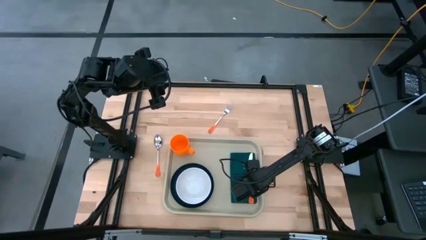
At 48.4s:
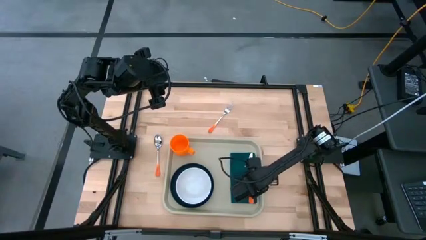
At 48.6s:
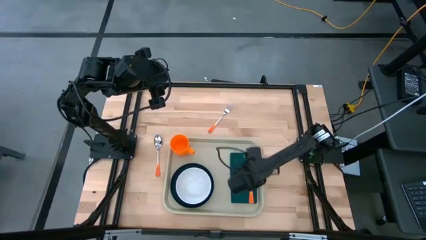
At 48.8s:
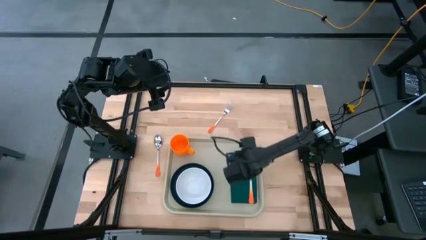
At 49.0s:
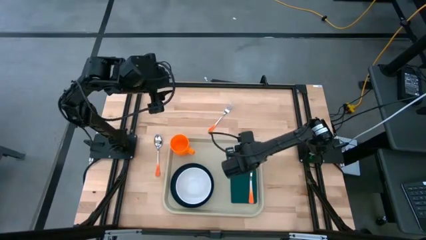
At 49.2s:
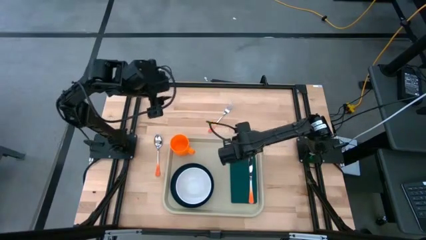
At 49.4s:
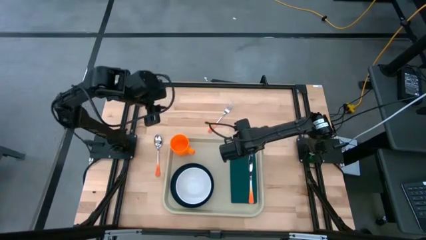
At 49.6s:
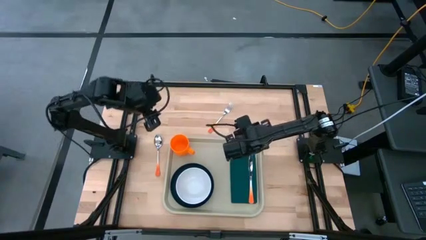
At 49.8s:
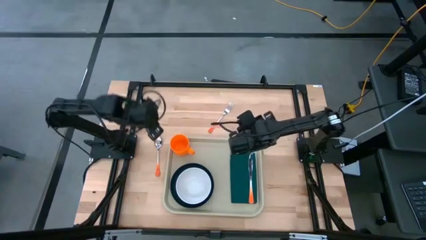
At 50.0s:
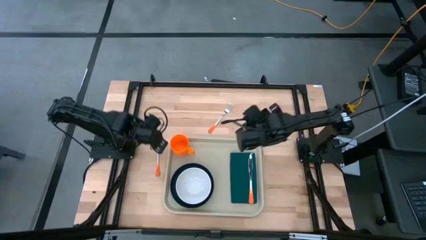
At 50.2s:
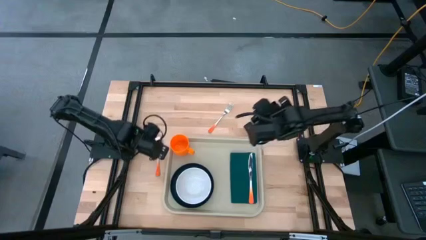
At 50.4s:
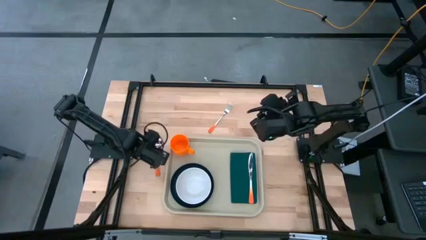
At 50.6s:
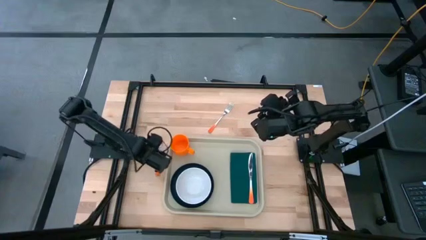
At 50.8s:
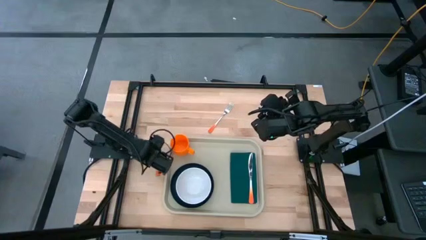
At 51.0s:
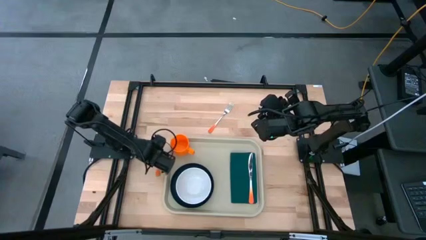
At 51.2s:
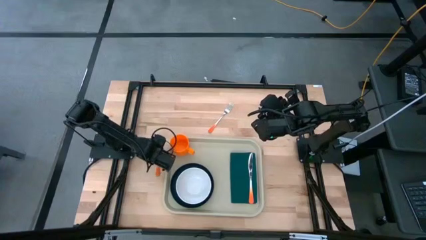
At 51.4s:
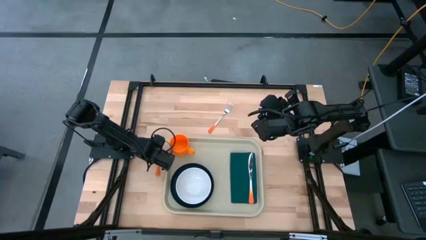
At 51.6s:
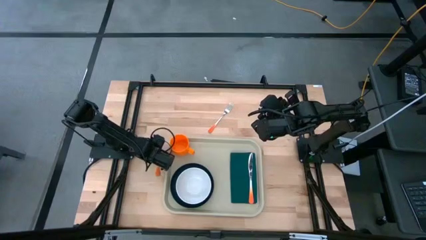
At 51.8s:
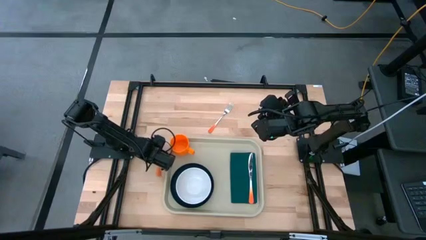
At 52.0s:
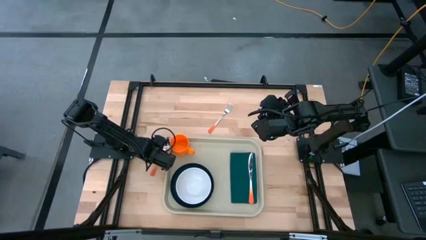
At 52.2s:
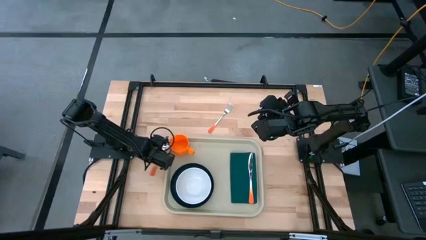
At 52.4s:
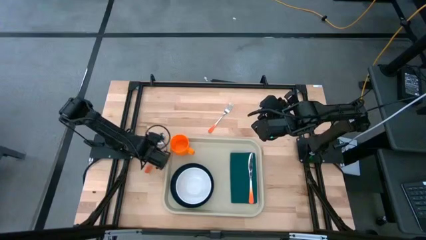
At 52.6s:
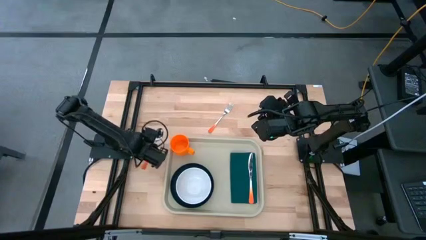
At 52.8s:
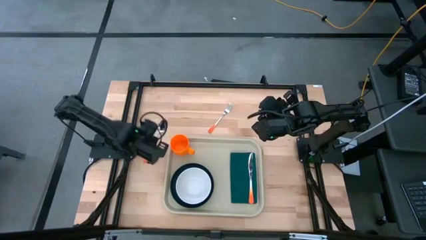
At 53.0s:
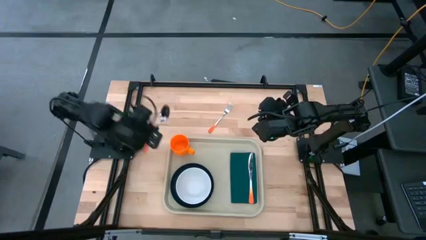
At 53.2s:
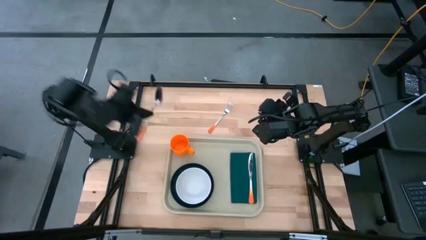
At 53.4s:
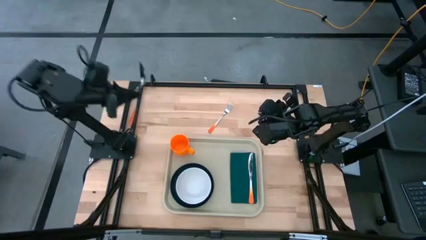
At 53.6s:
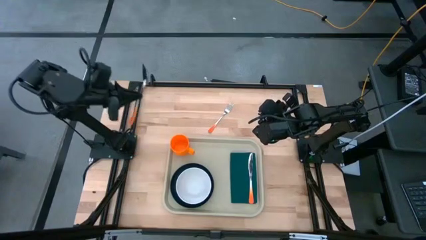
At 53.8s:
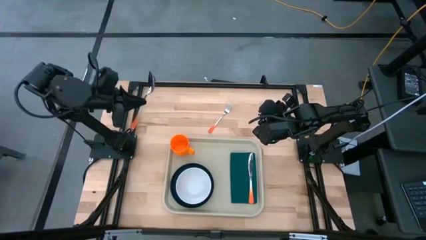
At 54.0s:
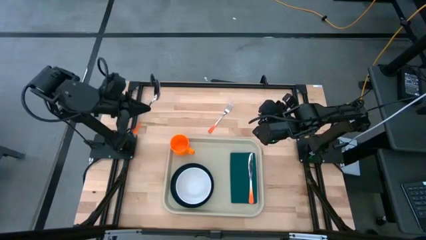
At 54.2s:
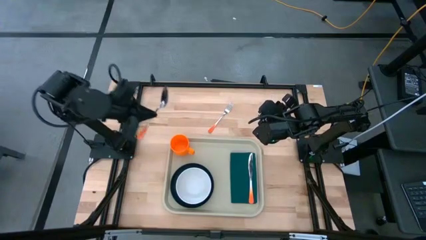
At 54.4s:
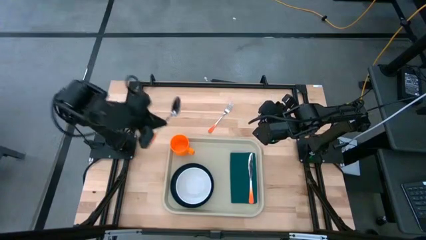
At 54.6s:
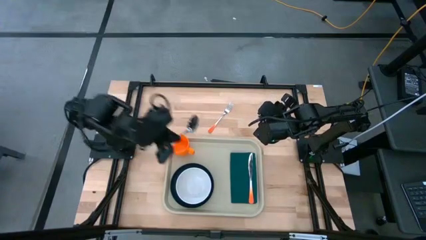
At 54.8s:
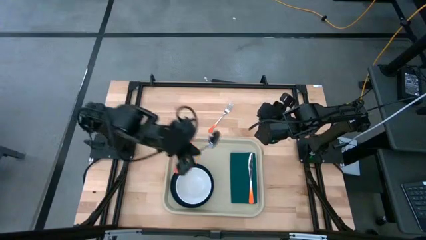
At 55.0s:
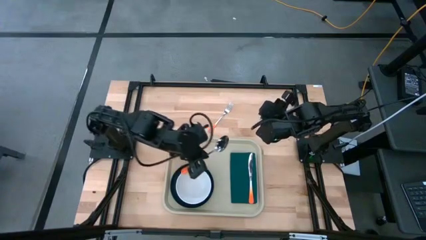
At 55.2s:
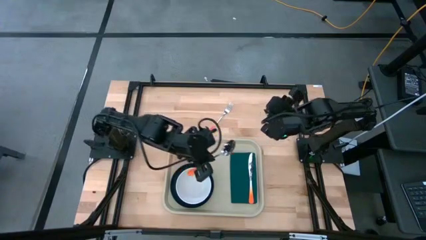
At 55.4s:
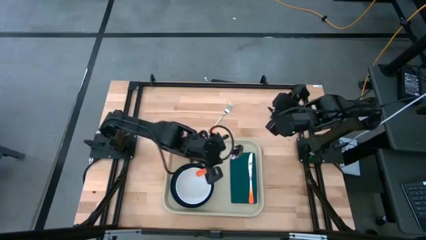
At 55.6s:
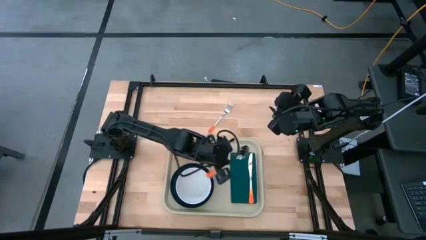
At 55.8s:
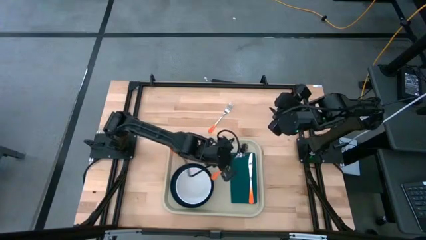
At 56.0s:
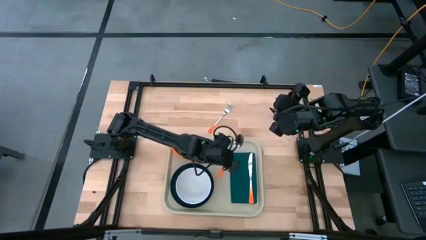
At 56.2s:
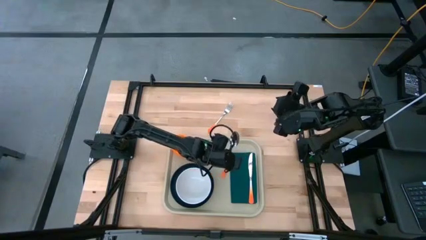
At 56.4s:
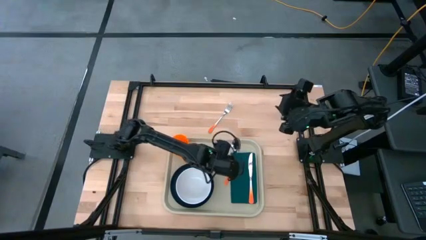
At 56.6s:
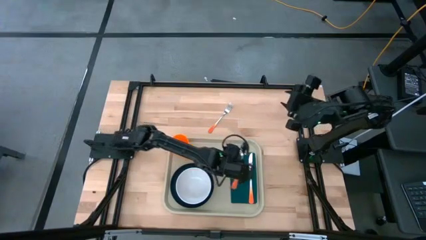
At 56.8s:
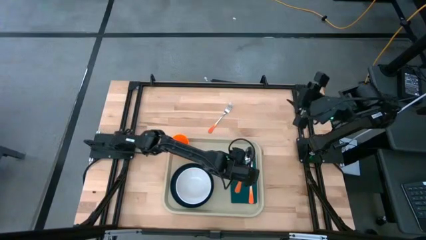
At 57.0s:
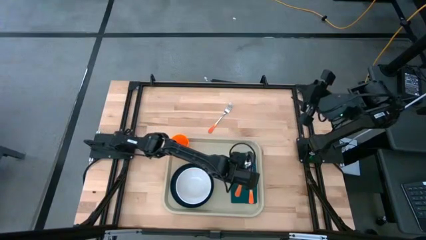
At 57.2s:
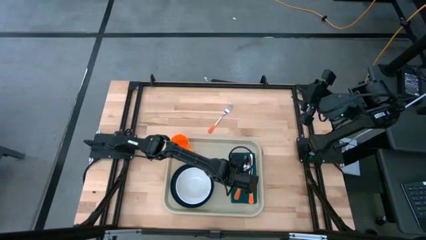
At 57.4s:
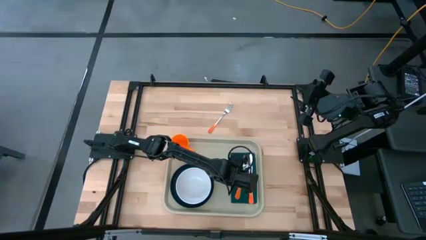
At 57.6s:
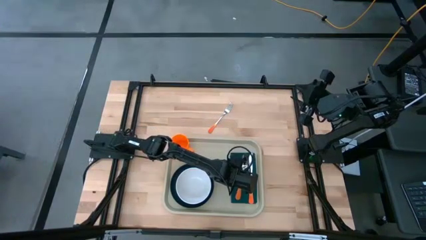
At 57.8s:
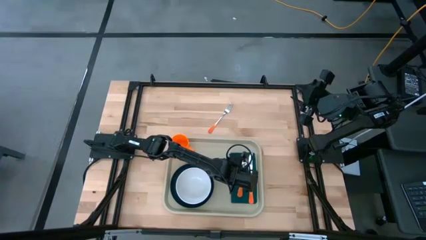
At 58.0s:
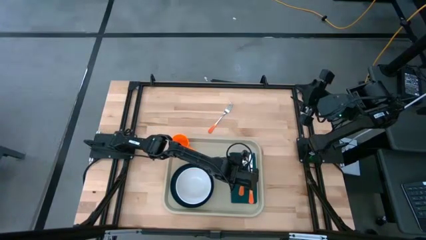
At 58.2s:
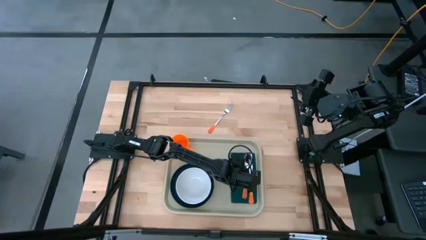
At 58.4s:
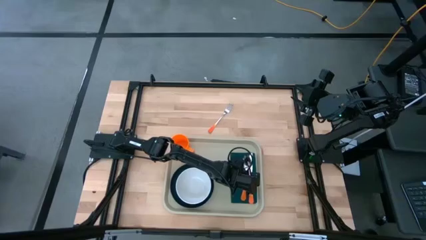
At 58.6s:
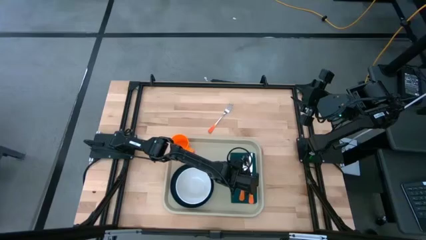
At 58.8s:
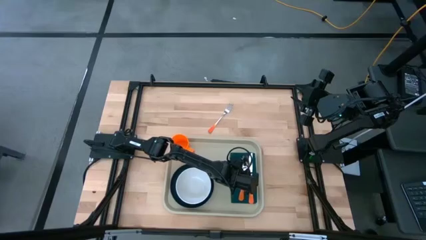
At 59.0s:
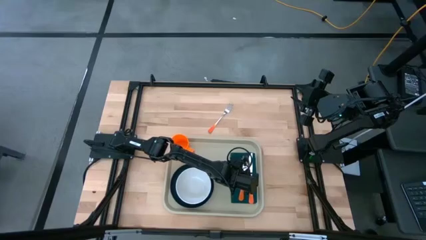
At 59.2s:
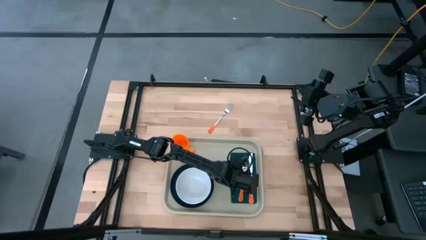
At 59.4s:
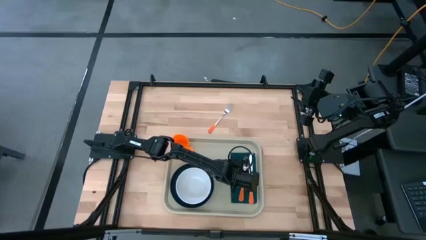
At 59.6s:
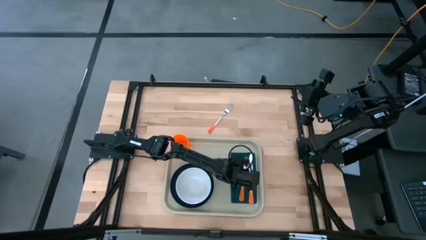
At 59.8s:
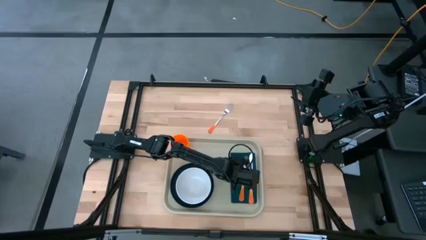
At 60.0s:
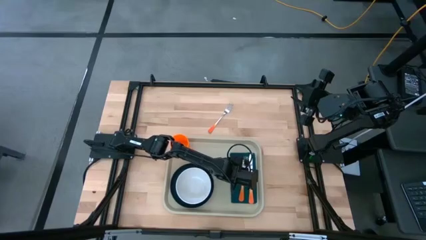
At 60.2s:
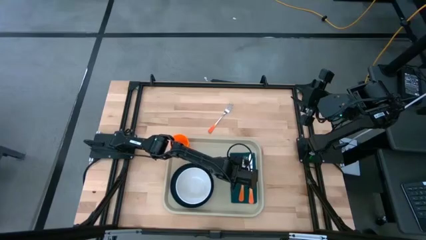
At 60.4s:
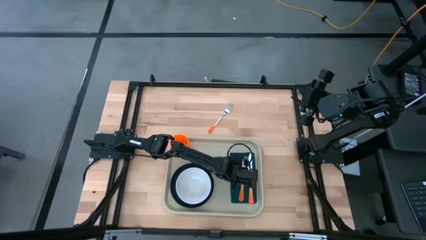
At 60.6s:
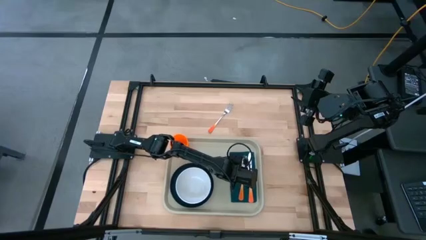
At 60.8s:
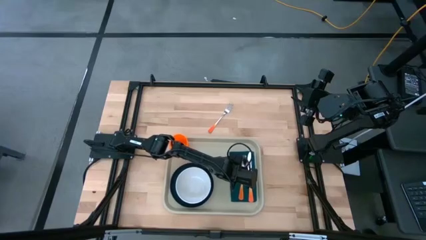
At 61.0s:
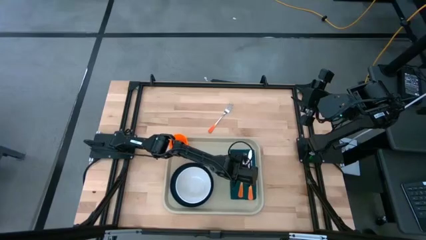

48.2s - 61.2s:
Task: Set up tray
Put the orange spoon to the left of the orange knife on the green napkin

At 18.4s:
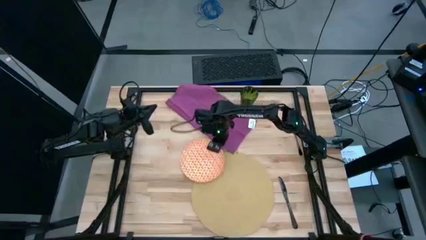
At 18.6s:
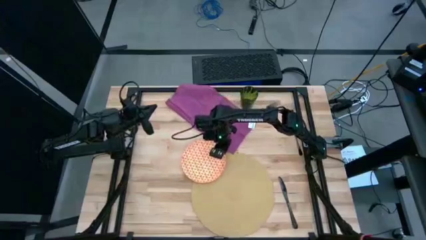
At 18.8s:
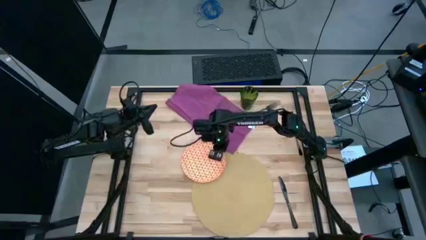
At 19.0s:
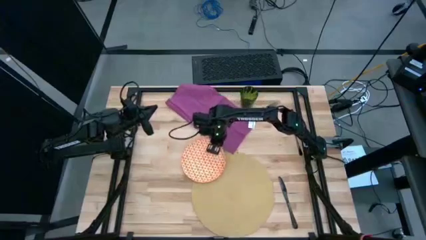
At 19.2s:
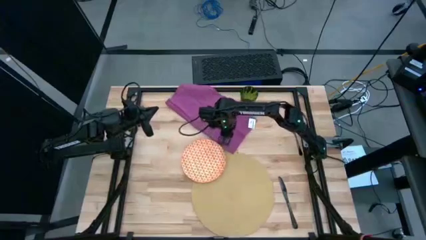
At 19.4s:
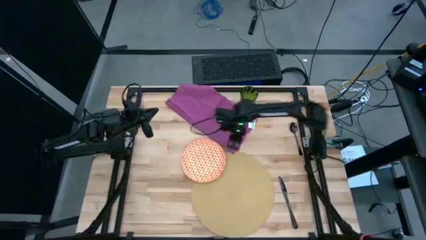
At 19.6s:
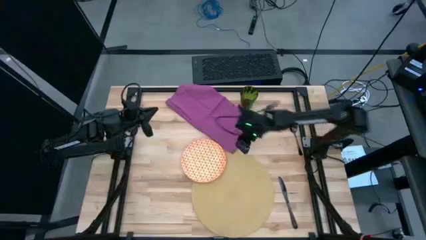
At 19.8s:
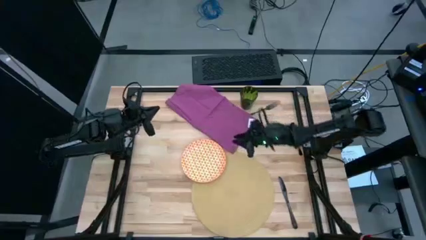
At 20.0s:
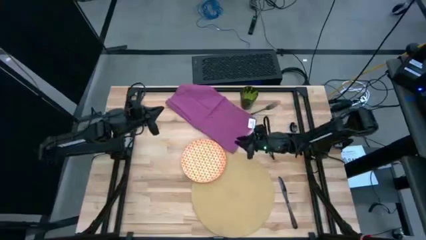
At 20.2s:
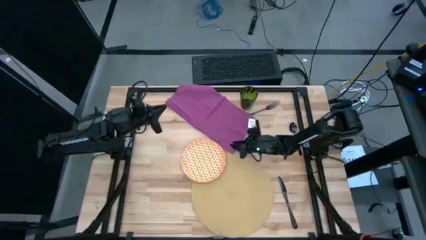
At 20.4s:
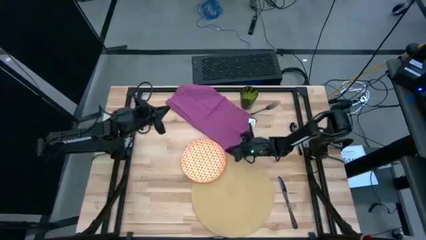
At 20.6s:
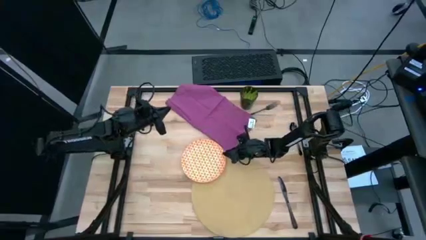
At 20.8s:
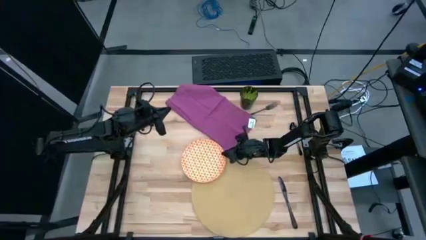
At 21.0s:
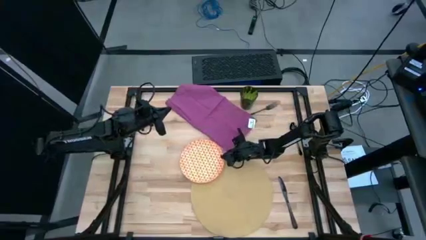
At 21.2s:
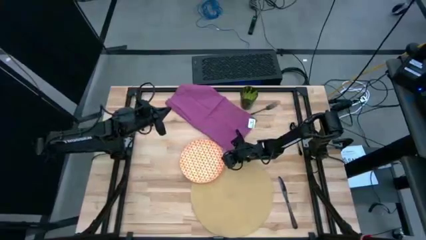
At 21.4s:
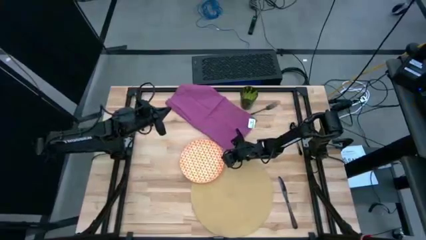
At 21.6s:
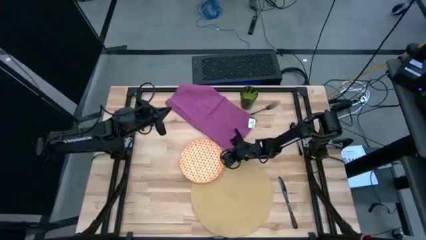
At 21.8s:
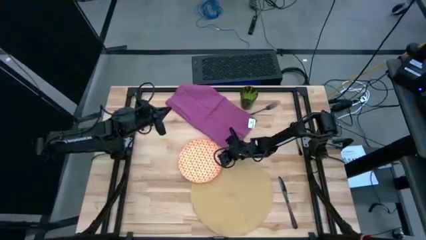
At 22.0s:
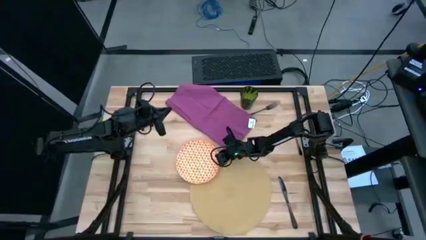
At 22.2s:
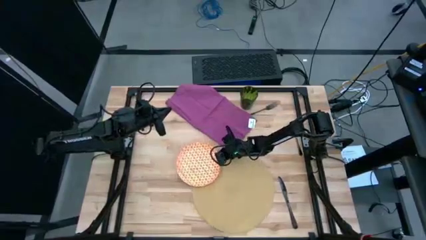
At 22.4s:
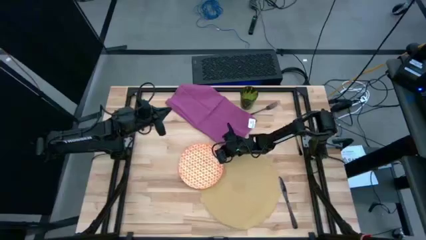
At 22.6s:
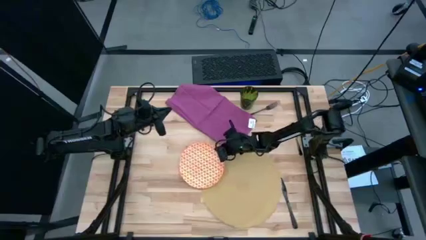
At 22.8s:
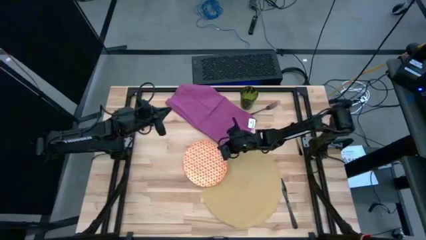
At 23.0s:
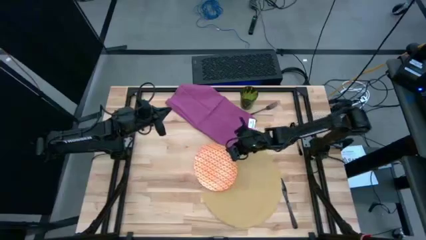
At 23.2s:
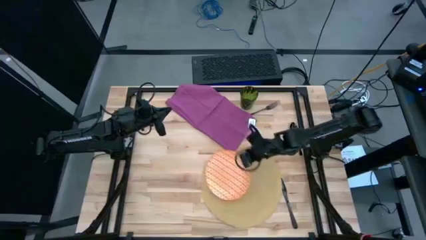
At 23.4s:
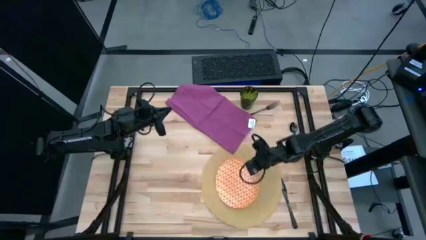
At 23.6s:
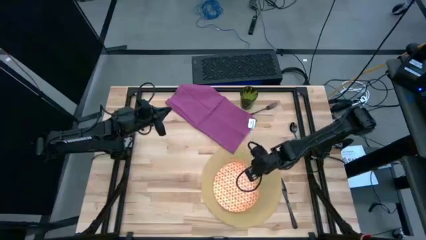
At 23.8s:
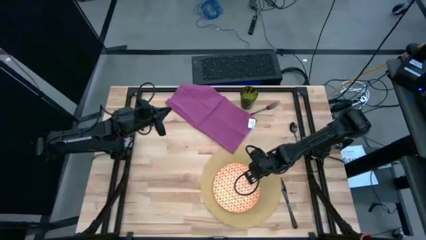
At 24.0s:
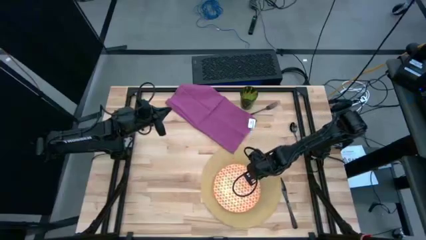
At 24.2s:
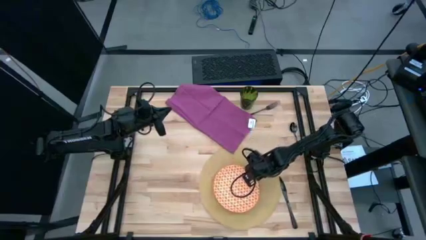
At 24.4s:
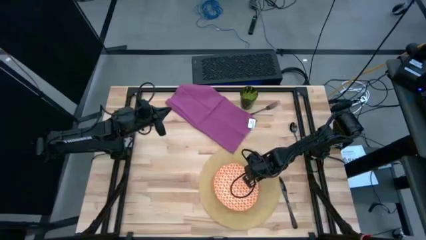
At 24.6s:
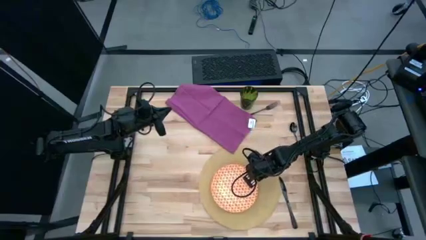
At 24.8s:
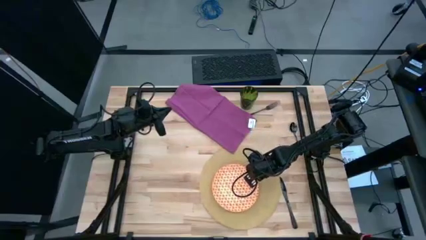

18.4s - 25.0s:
Task: Set table place
Put the orange plate on the brown table mat
